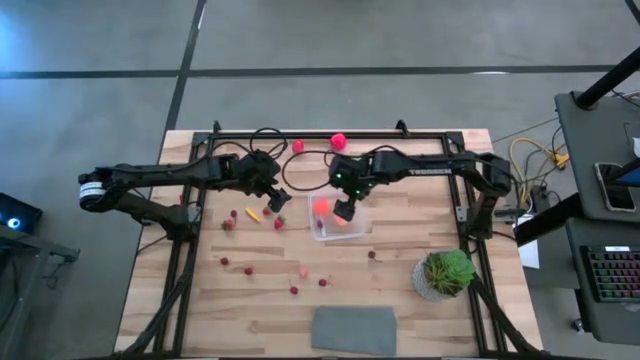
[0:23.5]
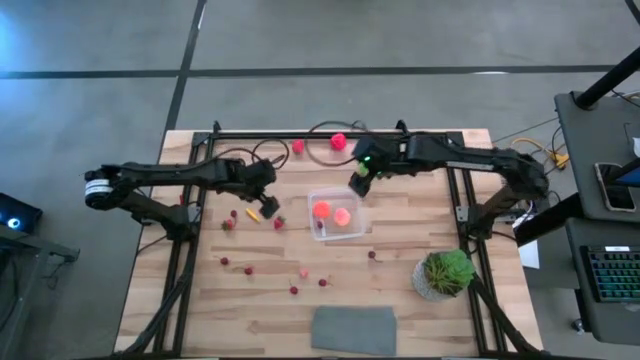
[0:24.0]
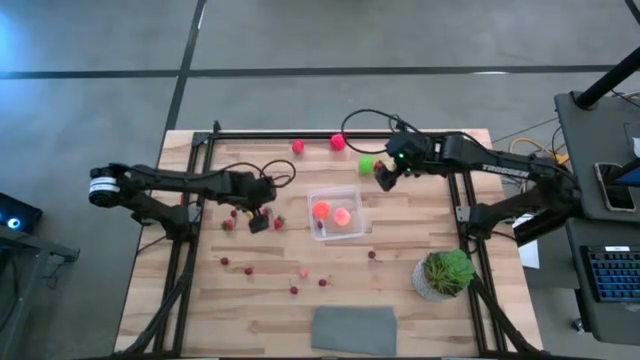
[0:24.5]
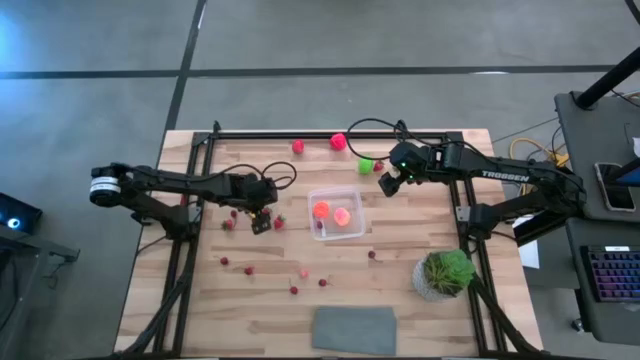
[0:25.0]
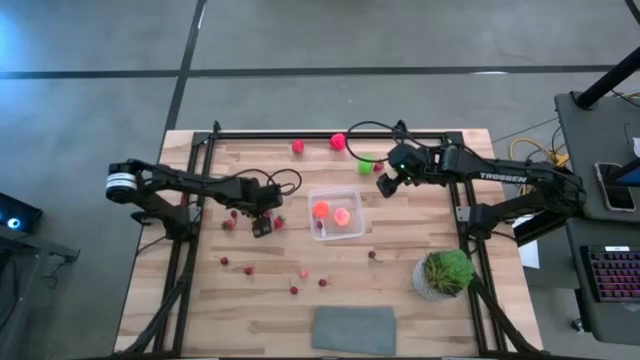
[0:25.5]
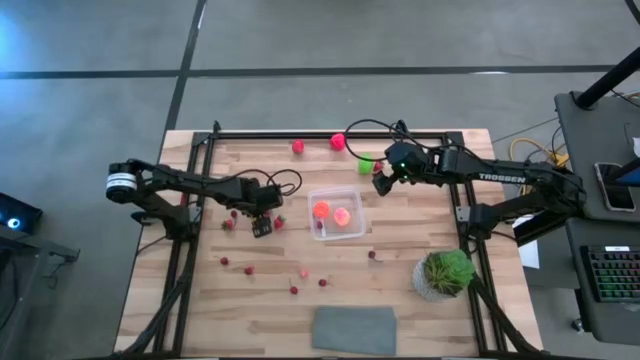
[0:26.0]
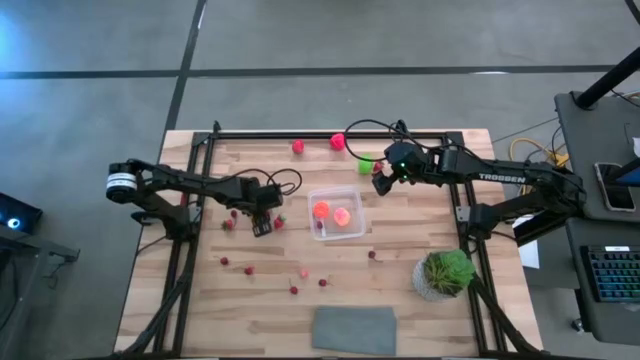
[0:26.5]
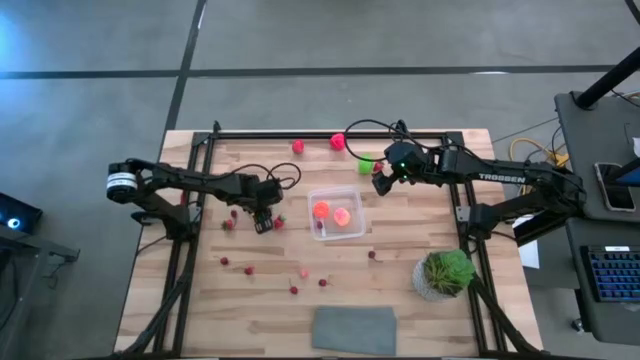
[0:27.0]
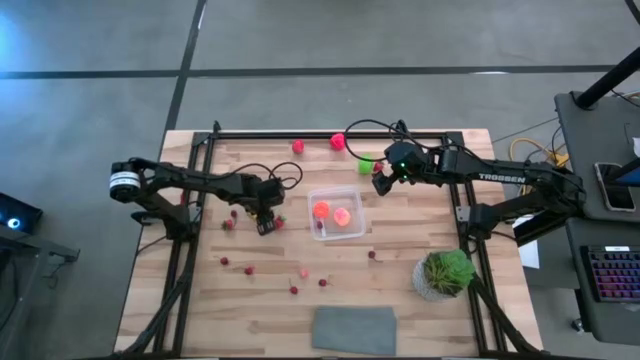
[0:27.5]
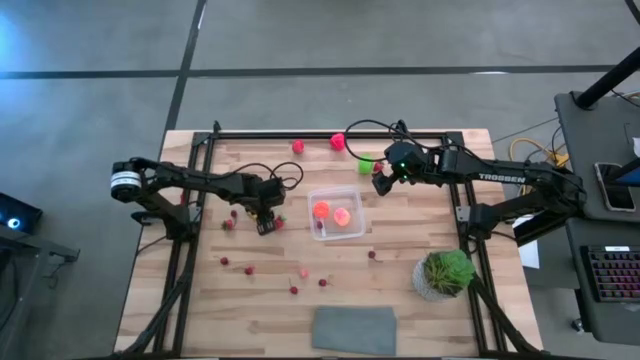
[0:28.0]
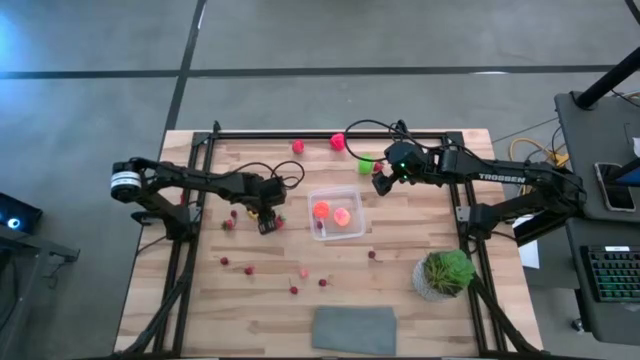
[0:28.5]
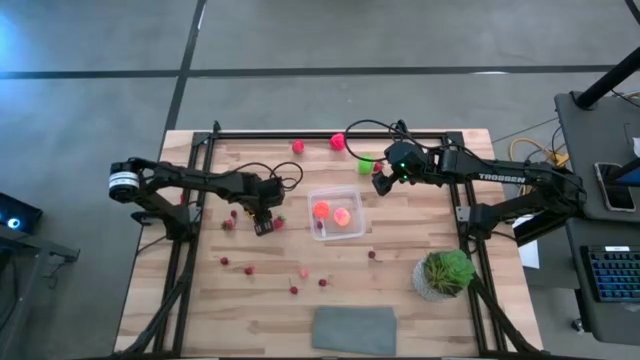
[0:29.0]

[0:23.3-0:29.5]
Task: Pick and placing Produce into tupperware
Put the red strawberry into the transparent container

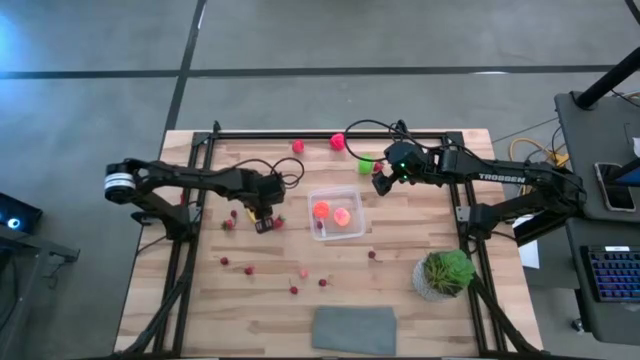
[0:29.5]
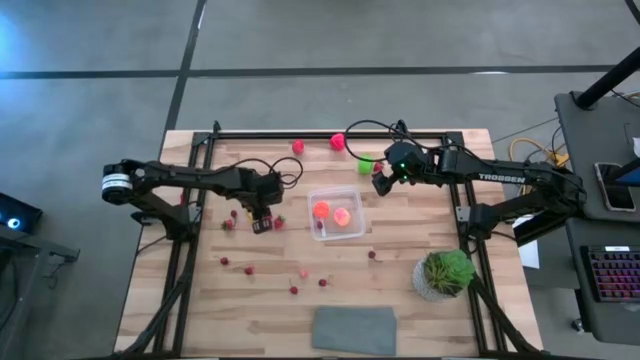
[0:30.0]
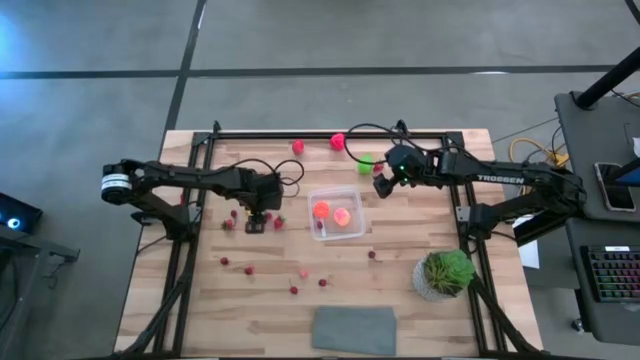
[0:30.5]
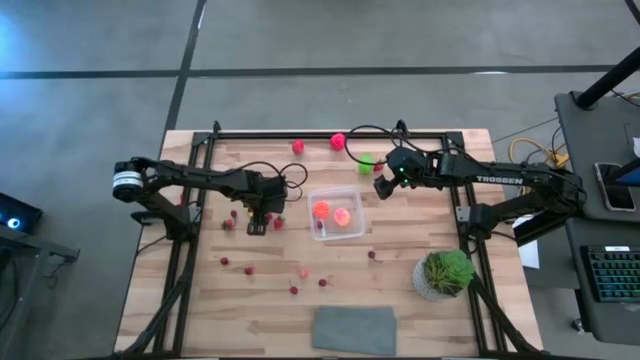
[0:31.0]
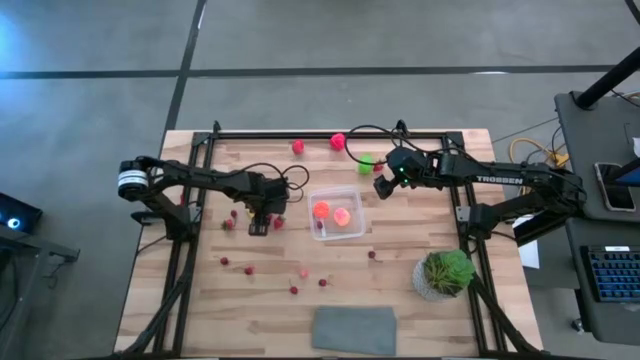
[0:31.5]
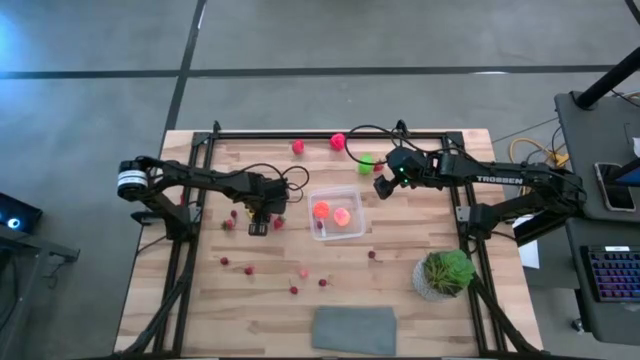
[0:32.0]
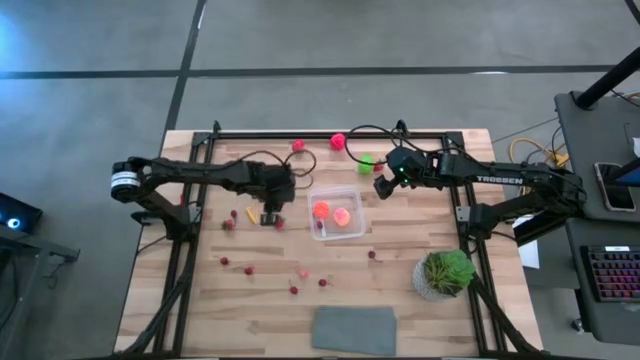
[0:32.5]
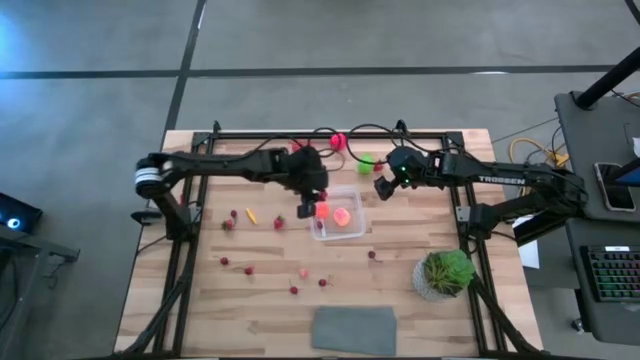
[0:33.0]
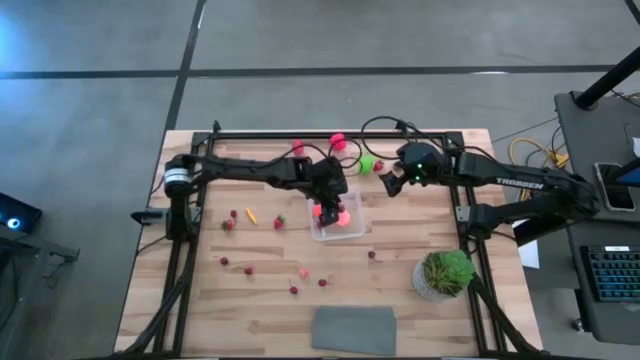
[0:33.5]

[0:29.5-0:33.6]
Put the red strawberry into the transparent container

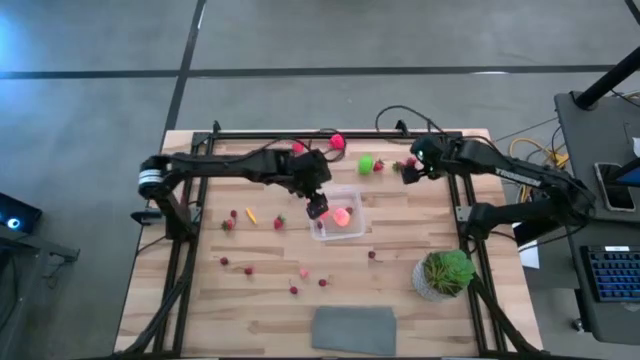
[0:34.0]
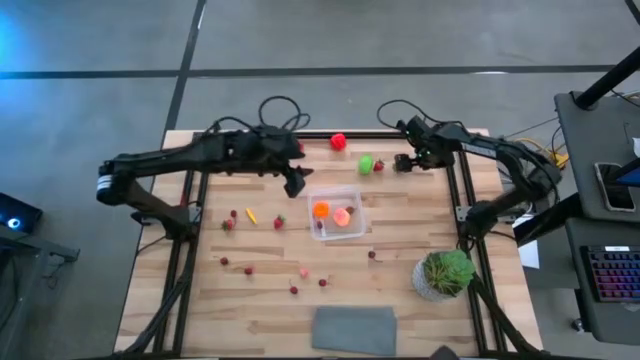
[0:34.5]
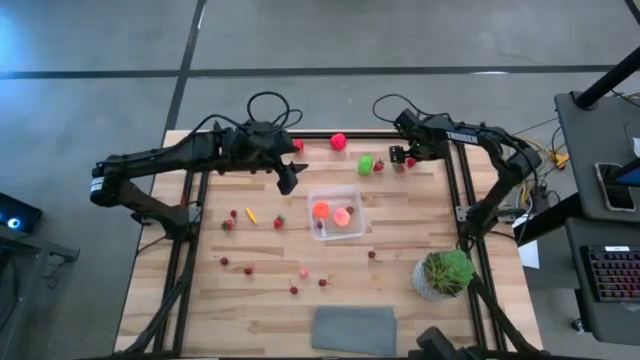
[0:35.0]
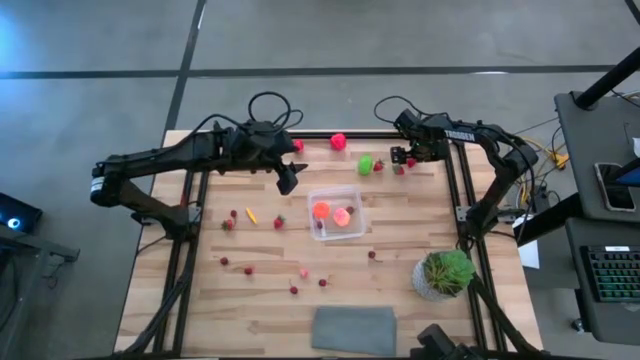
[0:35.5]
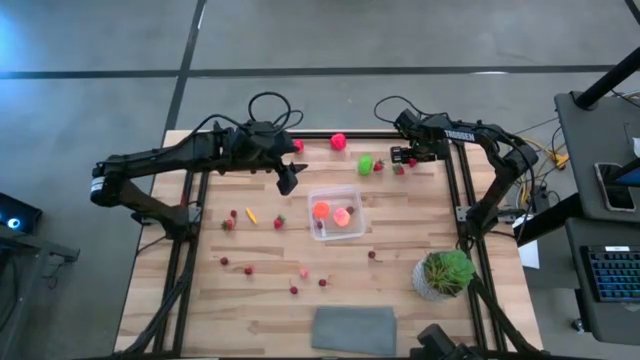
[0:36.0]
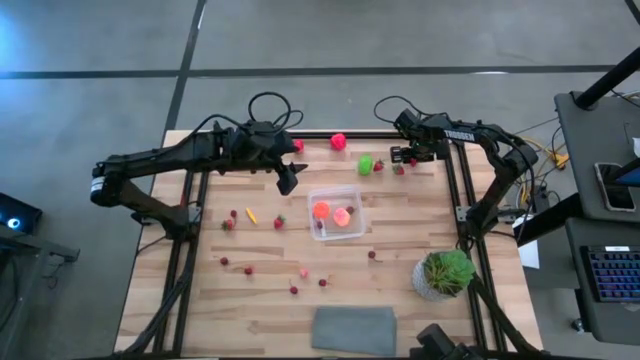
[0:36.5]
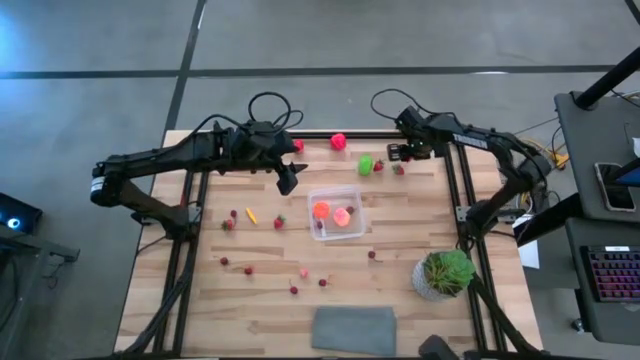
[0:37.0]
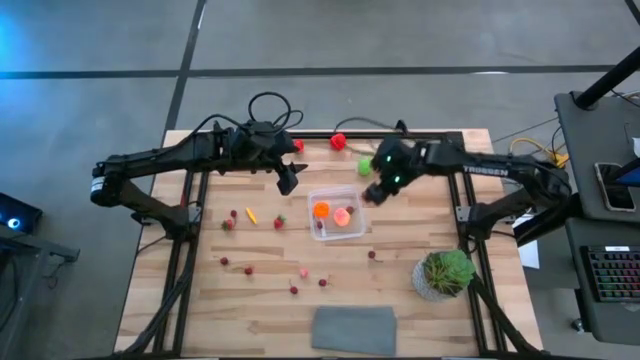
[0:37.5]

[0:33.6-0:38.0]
Put the red strawberry into the transparent container

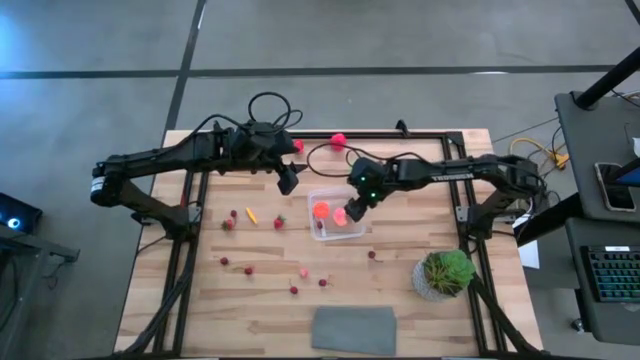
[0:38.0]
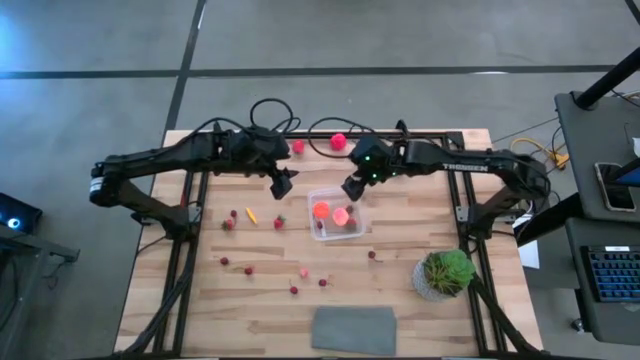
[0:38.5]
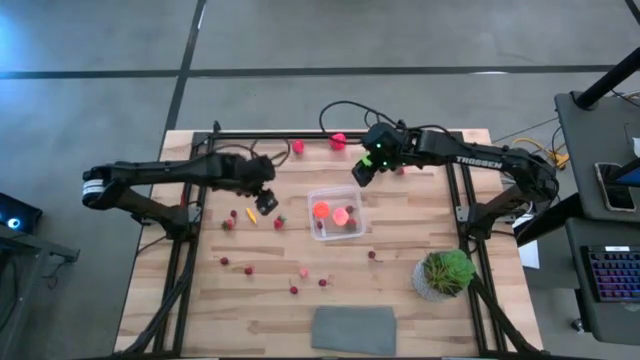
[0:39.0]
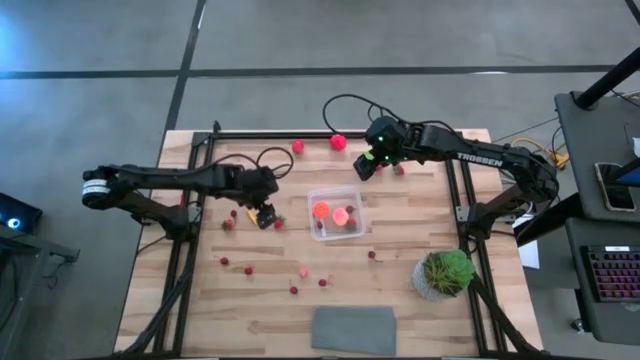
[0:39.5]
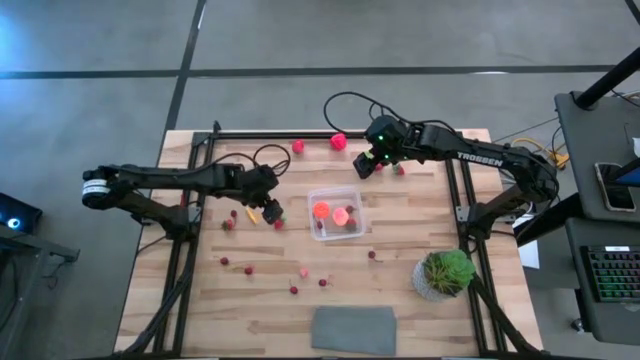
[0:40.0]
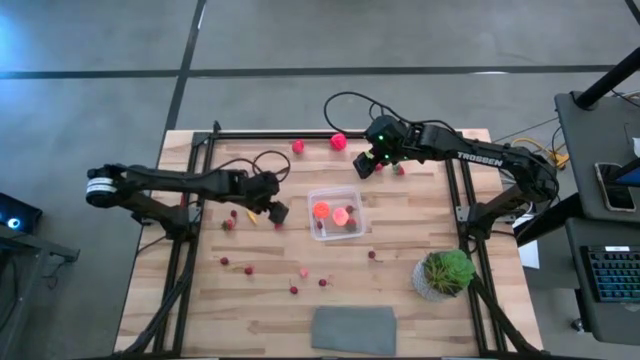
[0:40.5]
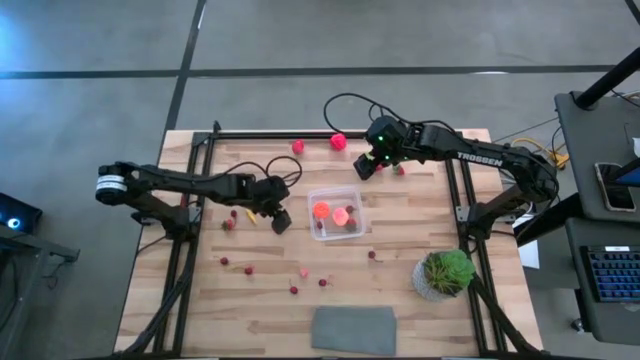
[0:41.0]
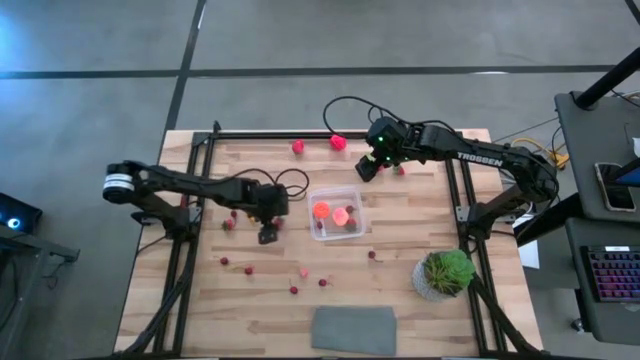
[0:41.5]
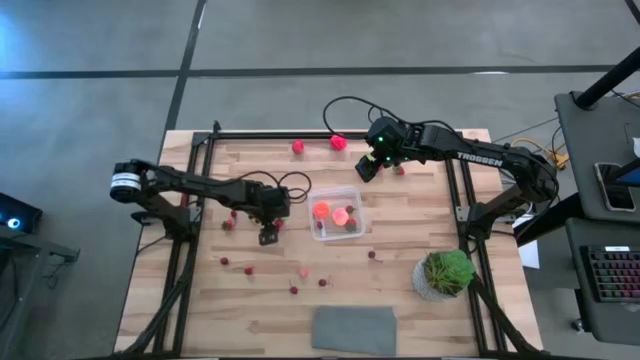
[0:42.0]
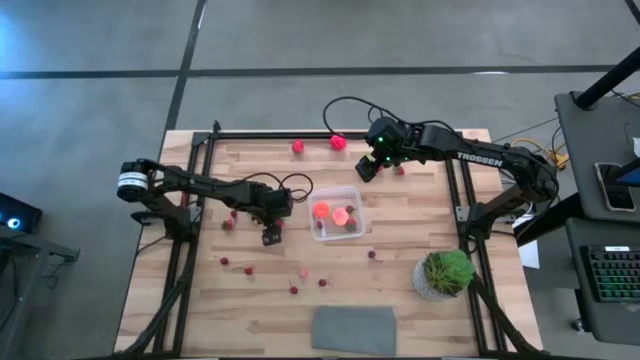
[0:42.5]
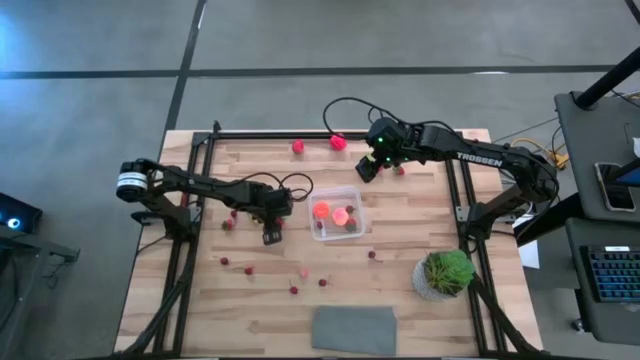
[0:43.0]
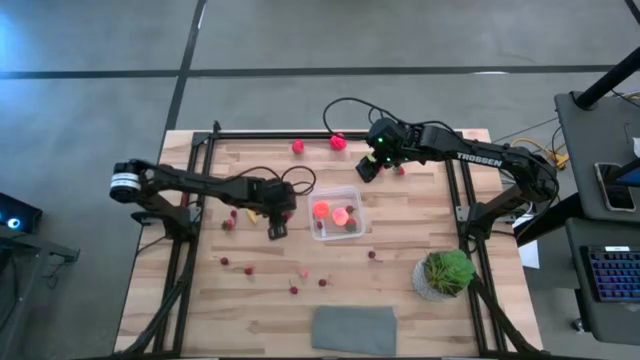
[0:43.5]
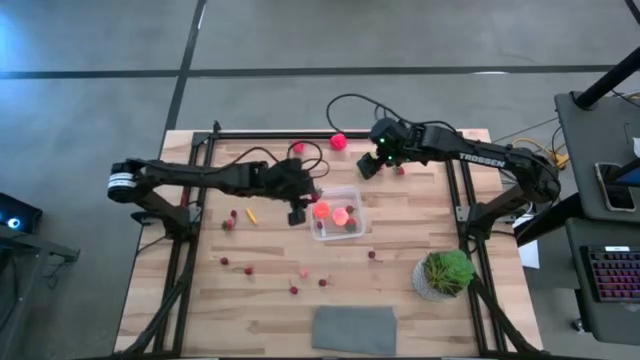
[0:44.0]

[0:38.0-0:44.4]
Put the red strawberry into the transparent container
